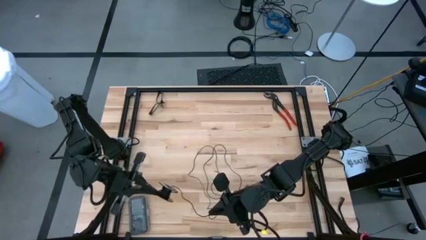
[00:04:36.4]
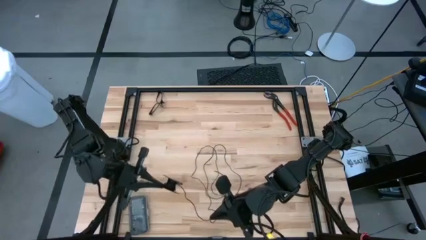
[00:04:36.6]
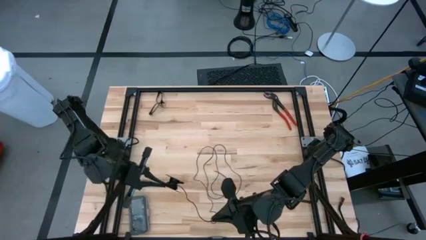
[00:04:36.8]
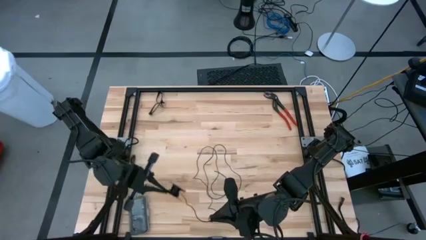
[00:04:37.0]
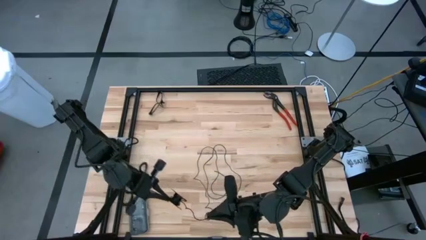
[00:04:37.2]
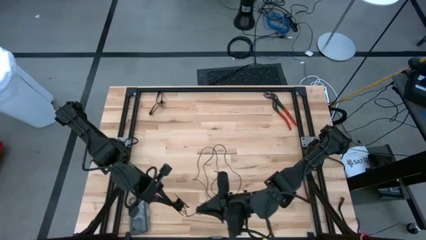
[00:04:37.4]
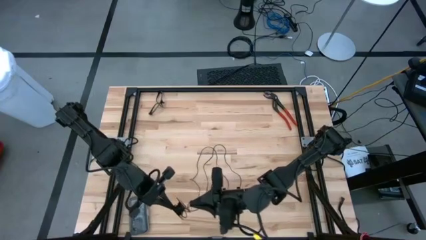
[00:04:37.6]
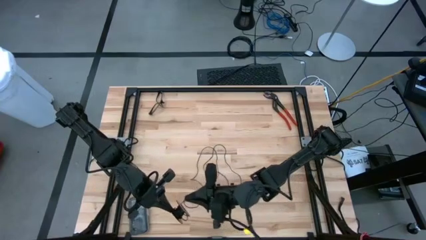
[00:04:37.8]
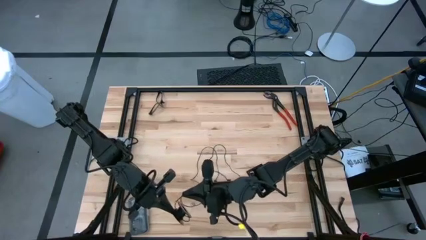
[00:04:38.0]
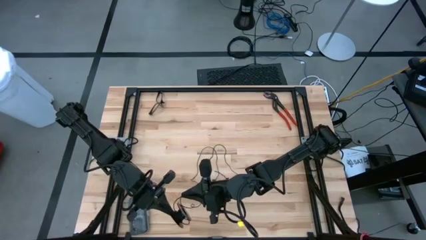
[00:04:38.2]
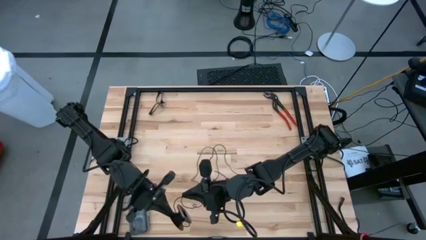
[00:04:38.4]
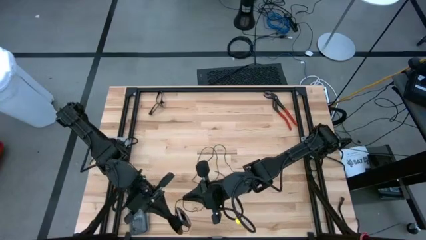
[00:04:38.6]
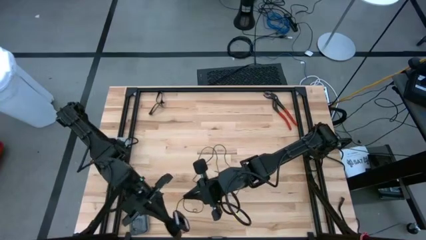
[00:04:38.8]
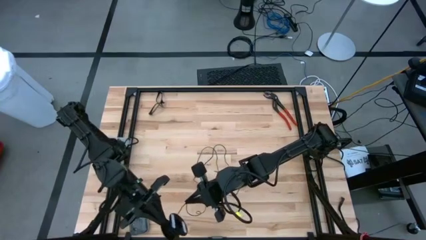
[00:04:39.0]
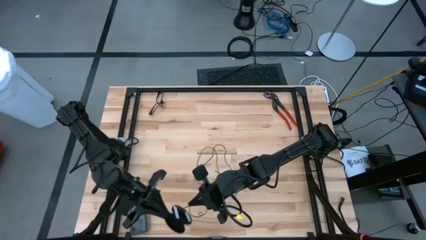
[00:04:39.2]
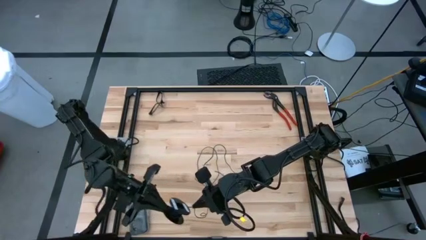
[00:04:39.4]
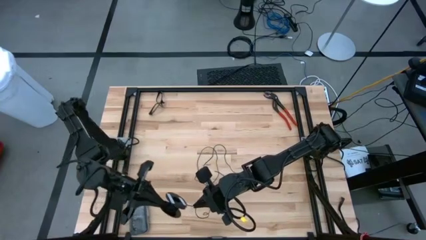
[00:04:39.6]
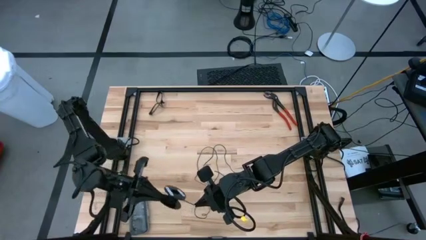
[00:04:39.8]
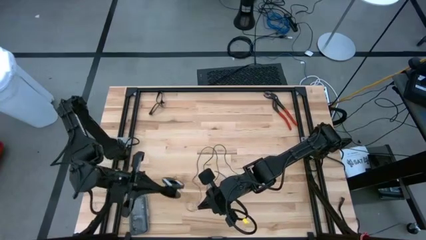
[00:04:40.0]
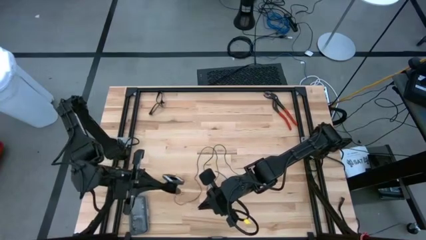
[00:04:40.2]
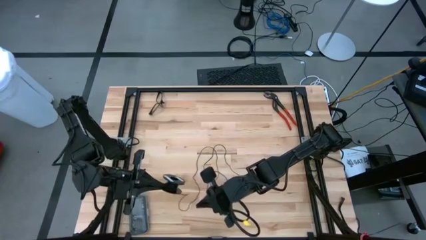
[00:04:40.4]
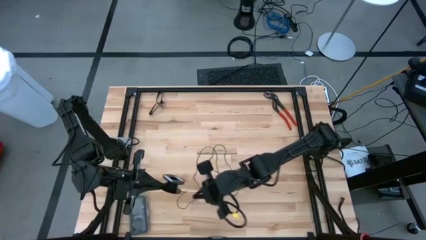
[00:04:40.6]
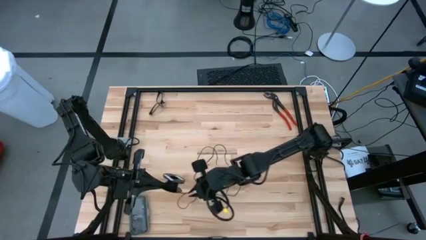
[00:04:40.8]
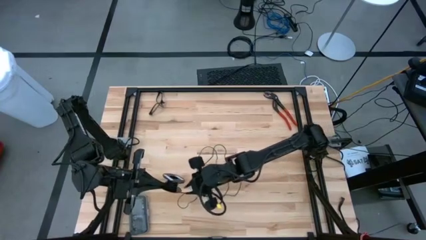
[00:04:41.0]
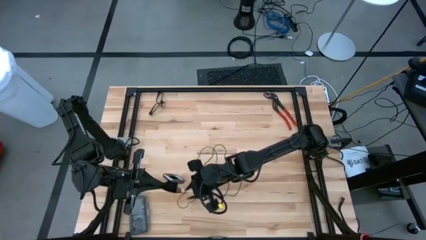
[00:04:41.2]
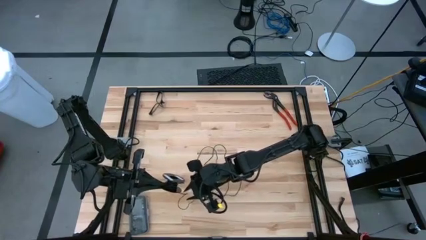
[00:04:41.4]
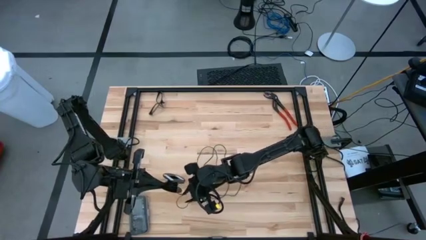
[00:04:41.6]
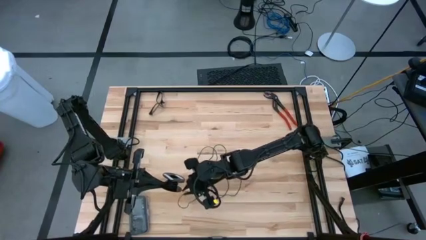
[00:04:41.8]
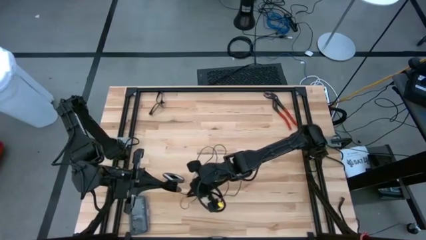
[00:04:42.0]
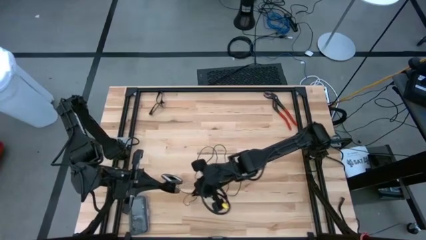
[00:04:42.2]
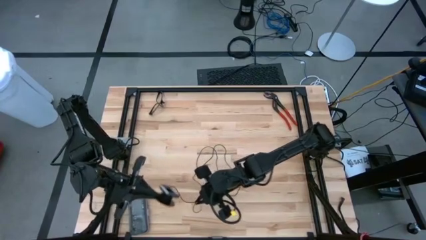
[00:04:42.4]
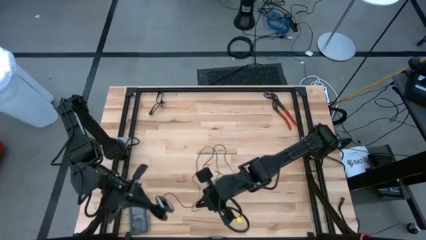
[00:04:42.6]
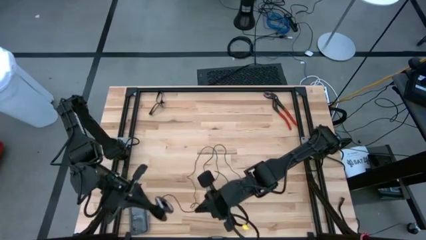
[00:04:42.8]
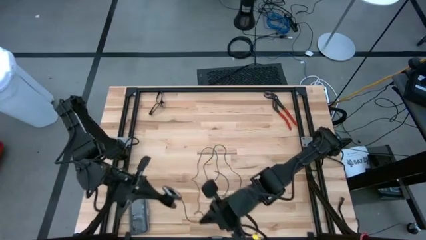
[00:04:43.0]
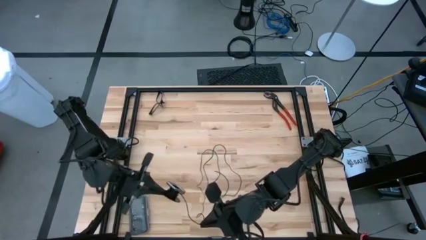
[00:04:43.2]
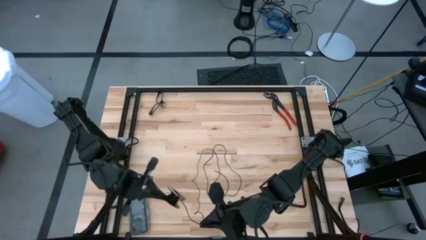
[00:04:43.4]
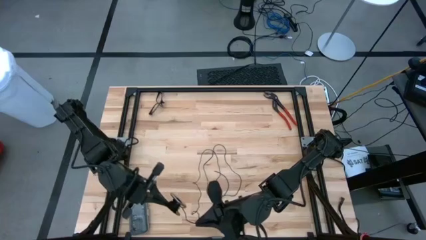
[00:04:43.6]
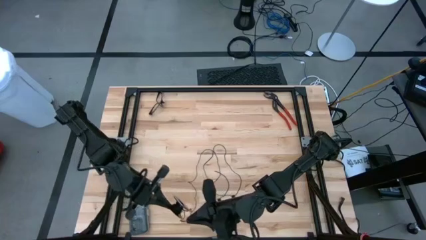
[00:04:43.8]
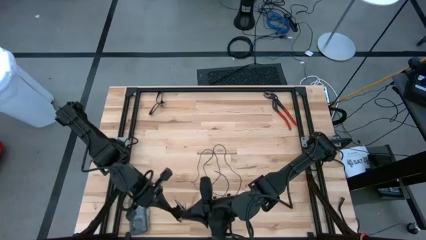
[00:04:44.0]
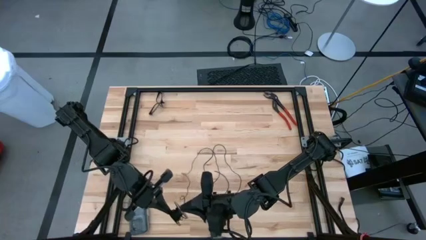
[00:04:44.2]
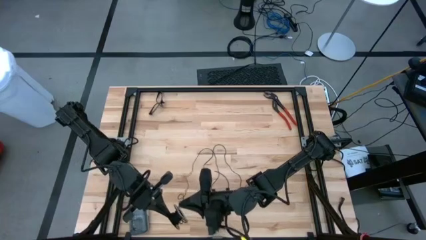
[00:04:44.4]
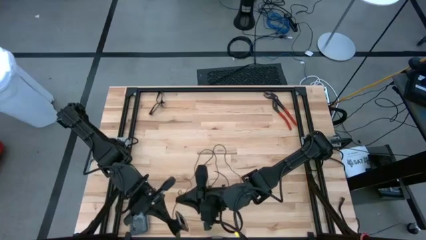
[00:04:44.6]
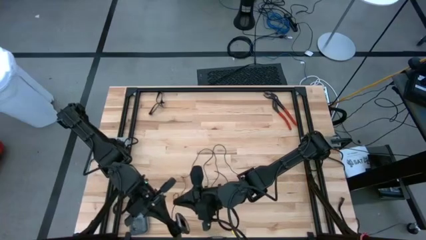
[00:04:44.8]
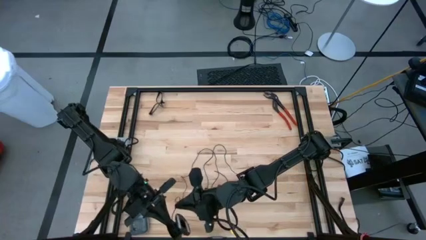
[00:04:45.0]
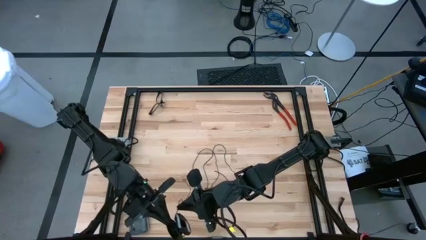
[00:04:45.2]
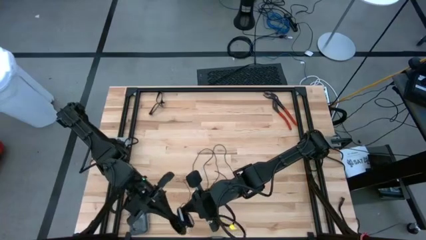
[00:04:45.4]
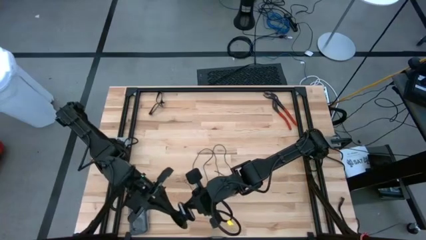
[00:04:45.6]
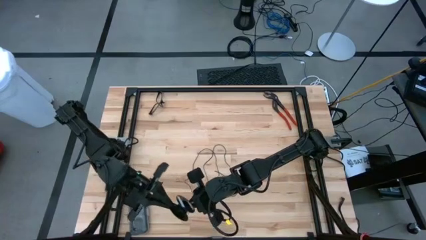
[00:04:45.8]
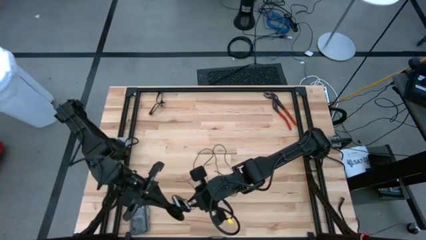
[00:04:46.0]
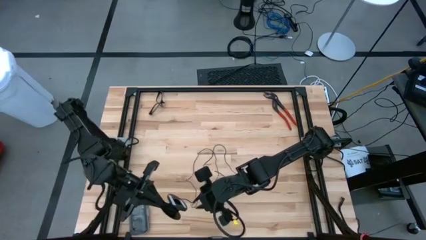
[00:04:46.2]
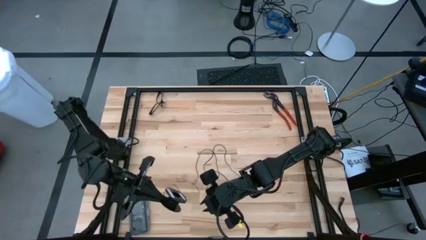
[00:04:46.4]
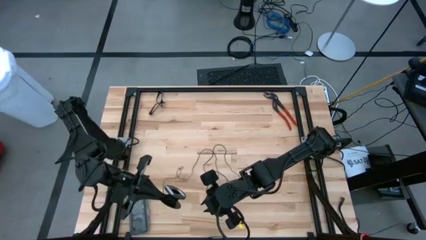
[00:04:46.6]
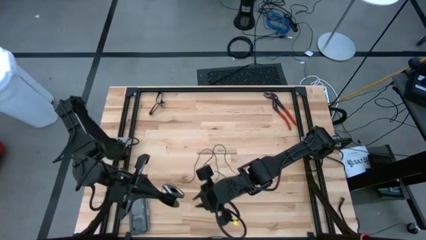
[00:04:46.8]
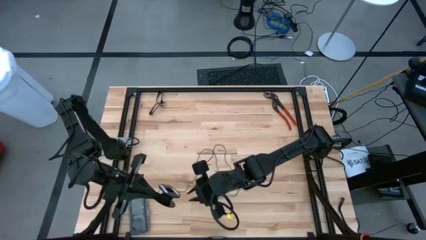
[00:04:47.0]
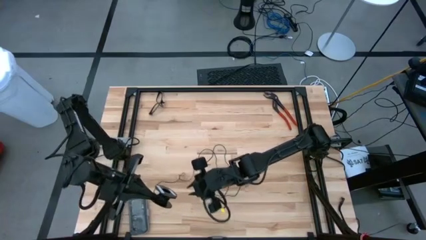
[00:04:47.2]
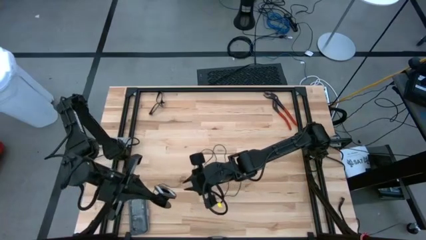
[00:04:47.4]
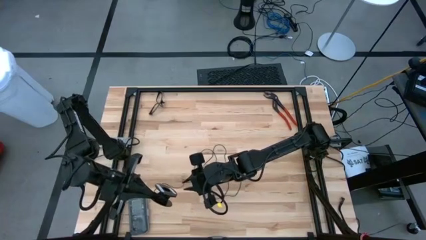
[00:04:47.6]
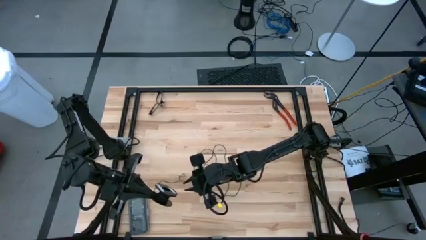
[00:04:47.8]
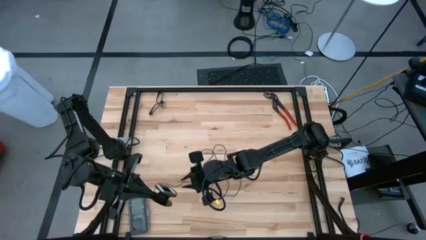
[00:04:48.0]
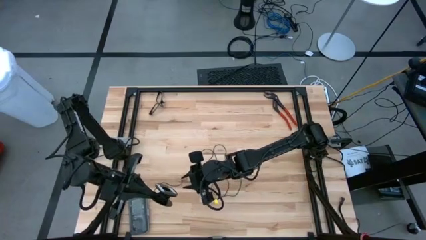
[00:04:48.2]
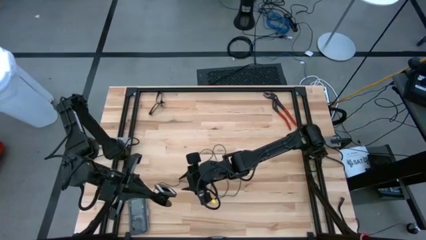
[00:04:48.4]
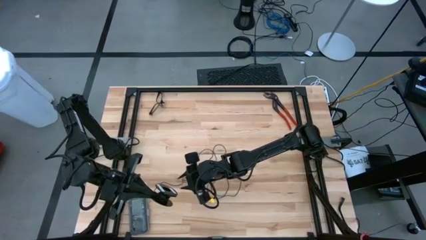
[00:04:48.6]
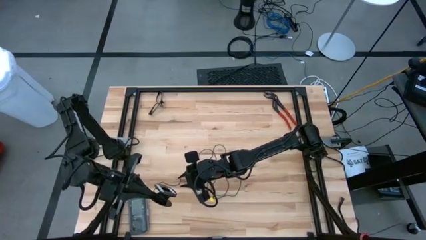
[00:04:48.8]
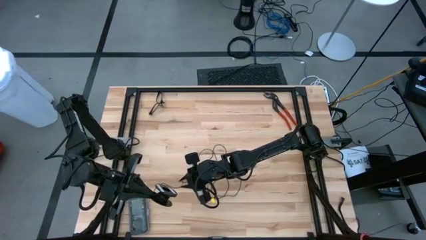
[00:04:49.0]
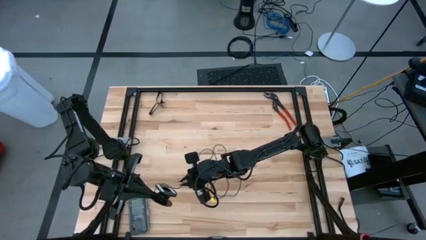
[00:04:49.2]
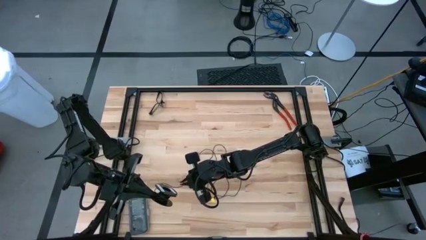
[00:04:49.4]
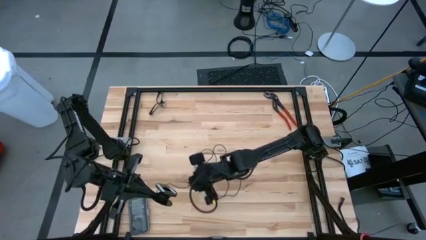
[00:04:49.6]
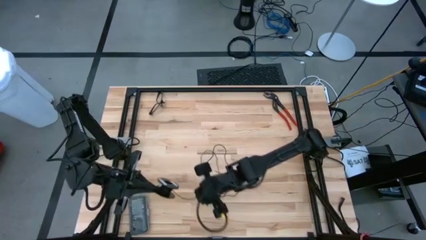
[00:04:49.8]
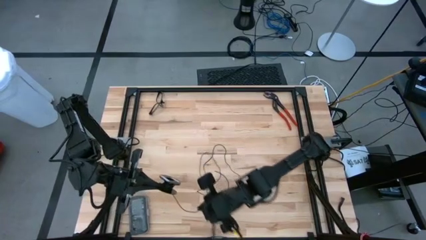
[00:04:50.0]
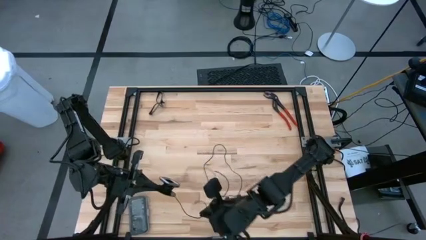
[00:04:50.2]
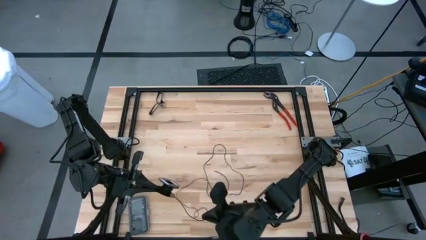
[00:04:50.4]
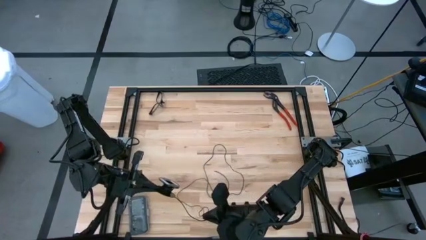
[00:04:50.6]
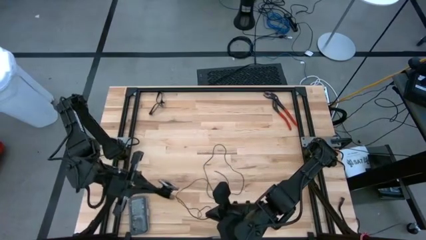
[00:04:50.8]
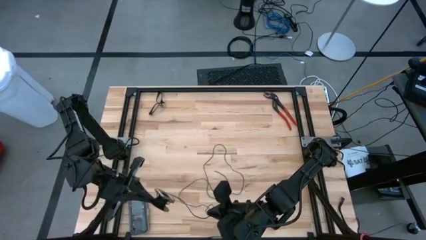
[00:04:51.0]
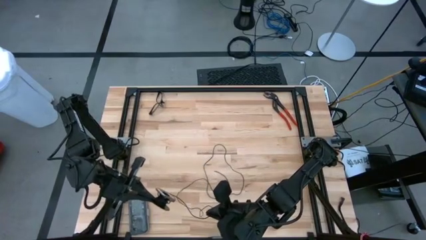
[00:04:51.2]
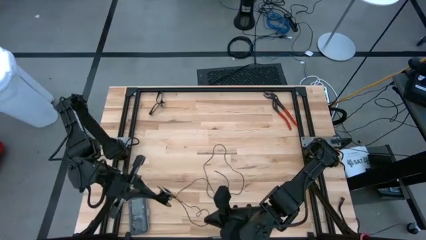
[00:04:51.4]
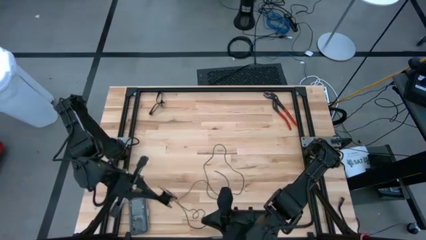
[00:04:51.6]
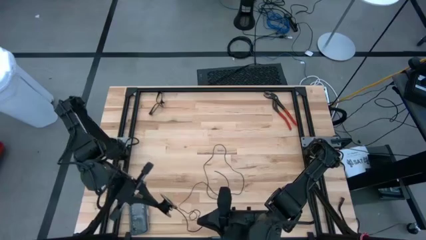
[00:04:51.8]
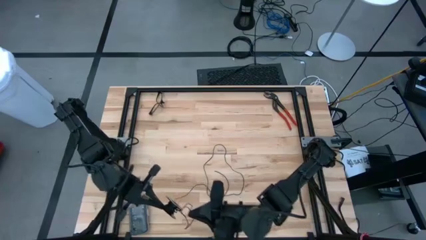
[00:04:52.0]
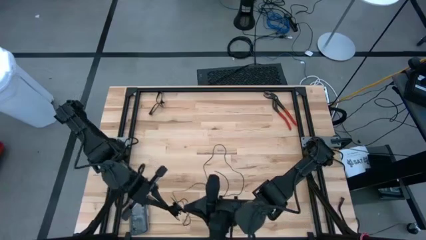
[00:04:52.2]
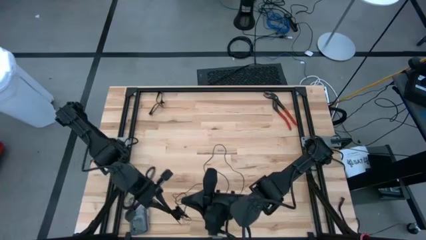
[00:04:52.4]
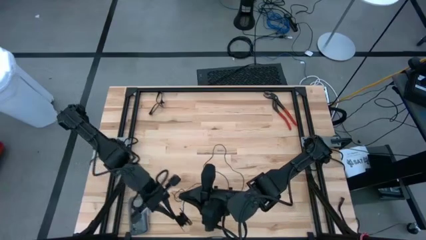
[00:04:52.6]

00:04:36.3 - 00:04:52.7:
Task: Coil cords
Coil the black wire onto the spool

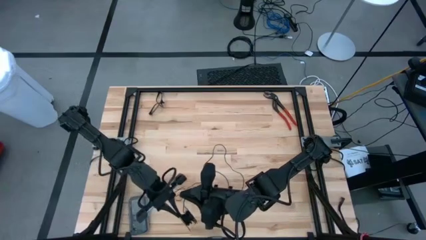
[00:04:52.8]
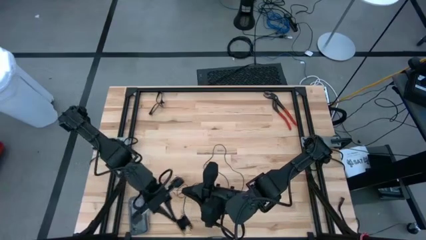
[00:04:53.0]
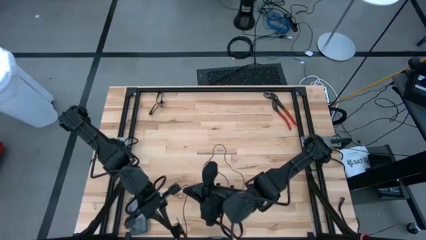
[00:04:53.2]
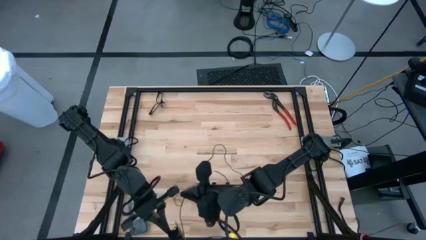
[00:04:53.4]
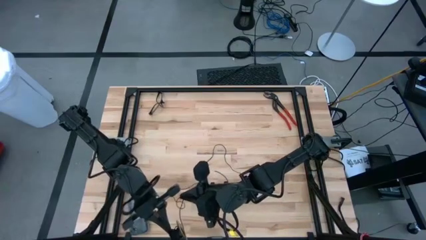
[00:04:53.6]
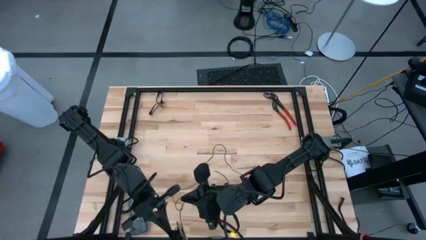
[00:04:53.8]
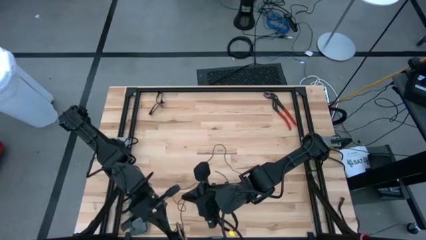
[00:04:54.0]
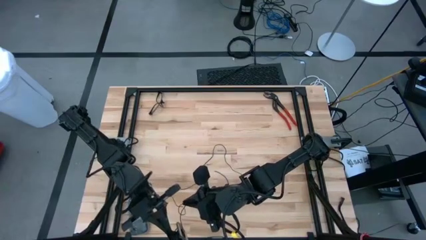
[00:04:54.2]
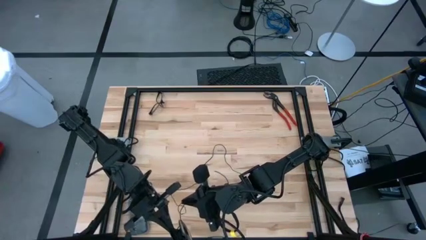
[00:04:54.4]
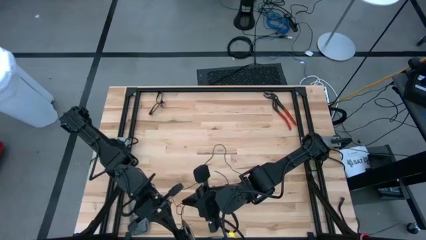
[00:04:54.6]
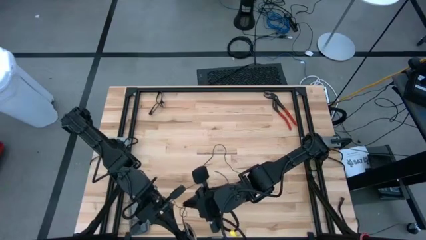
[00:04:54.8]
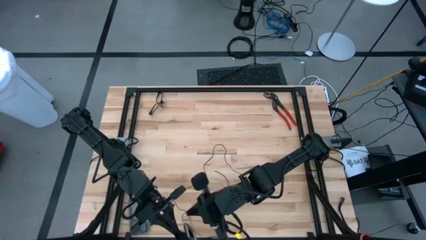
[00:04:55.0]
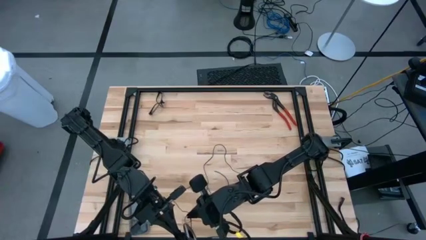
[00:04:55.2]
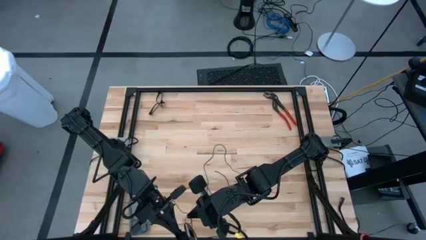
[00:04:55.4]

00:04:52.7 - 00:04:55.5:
Coil the black wire onto the spool
